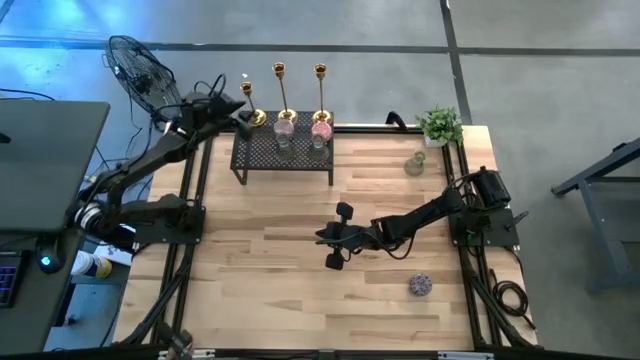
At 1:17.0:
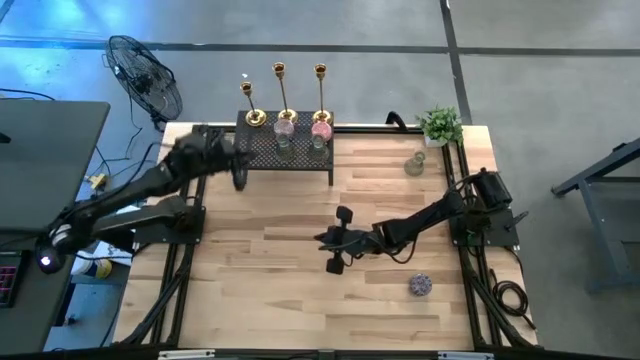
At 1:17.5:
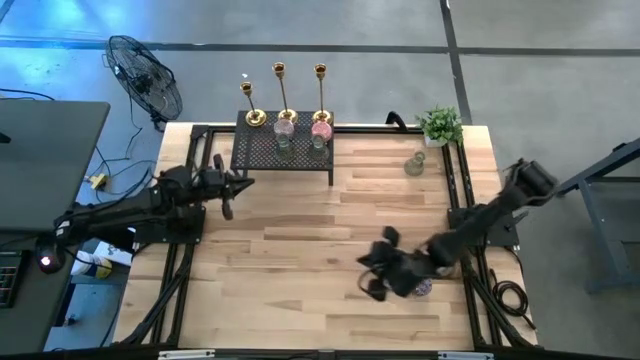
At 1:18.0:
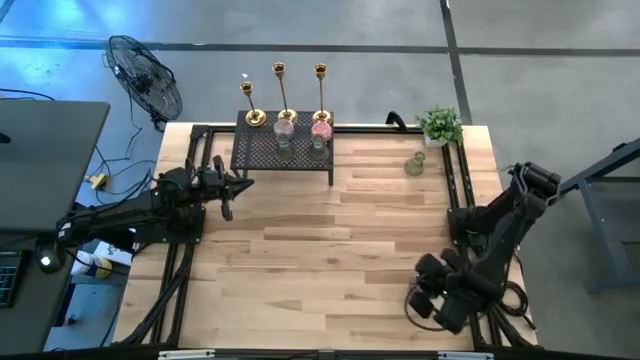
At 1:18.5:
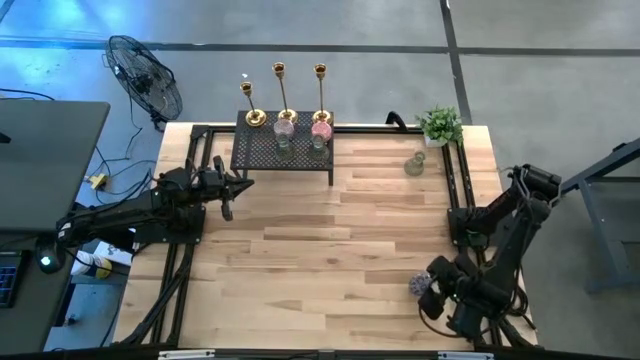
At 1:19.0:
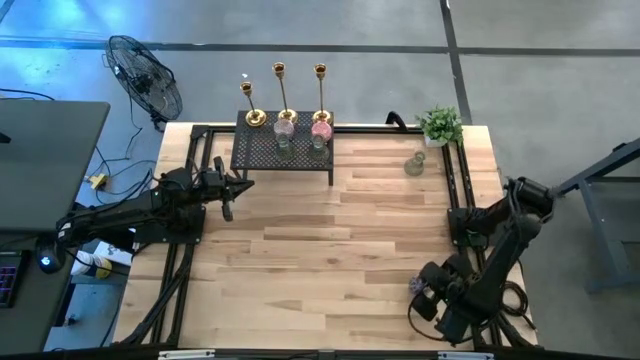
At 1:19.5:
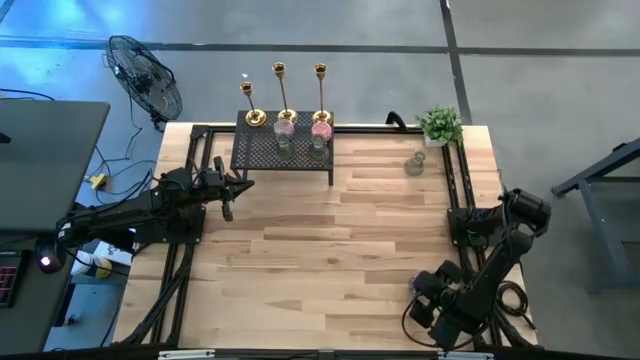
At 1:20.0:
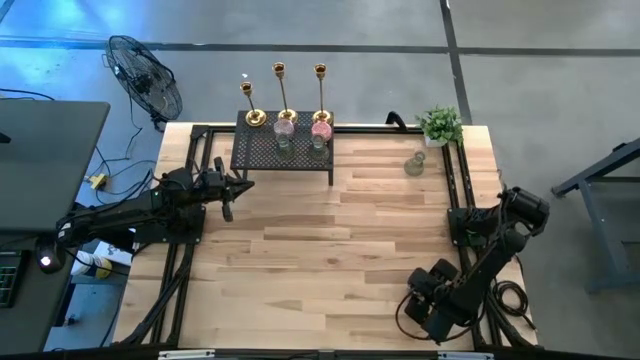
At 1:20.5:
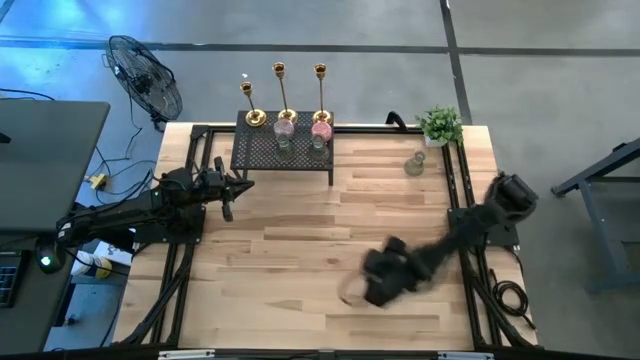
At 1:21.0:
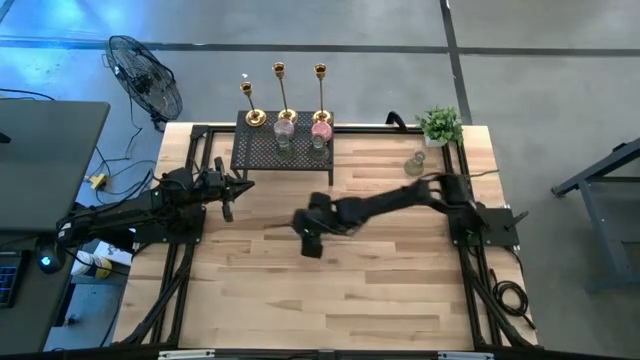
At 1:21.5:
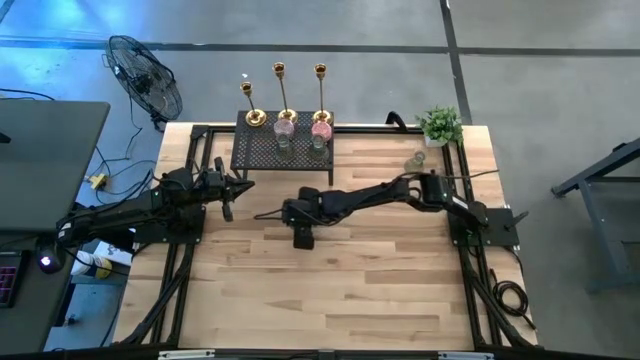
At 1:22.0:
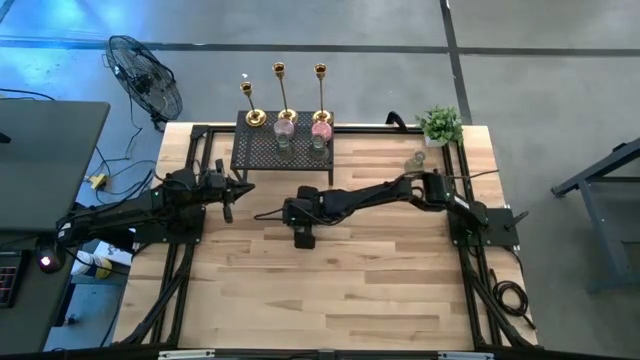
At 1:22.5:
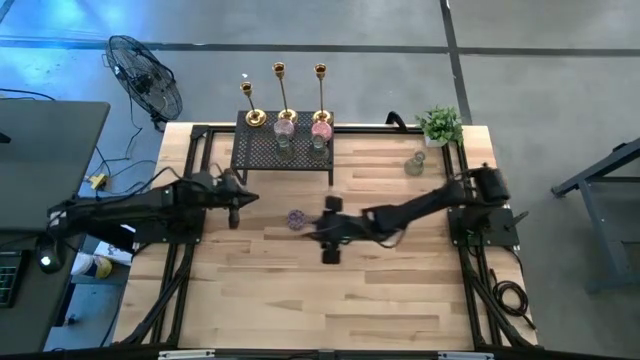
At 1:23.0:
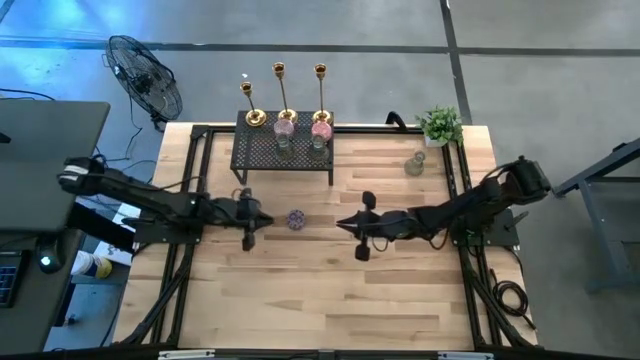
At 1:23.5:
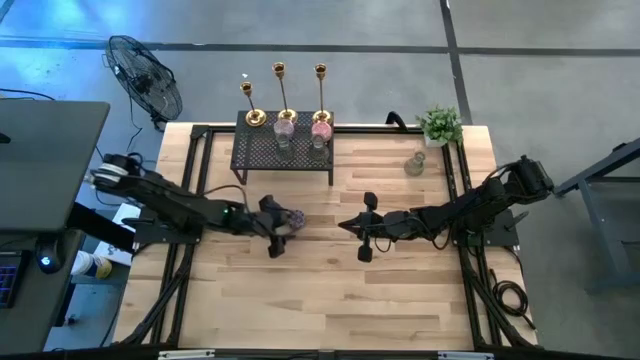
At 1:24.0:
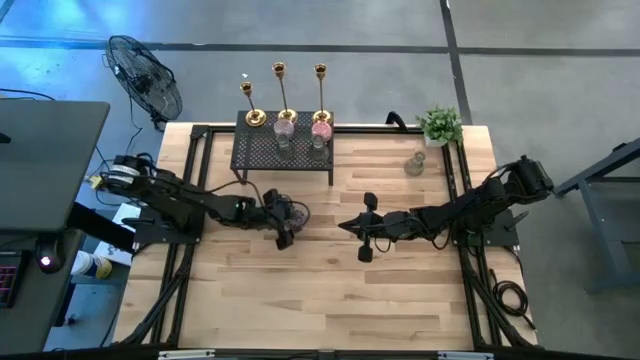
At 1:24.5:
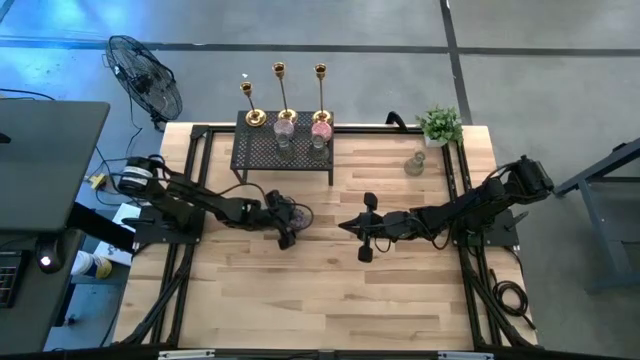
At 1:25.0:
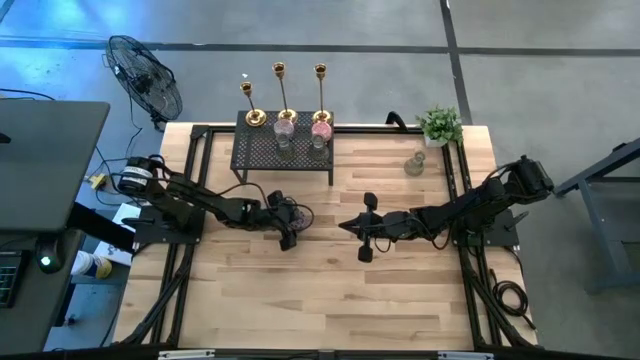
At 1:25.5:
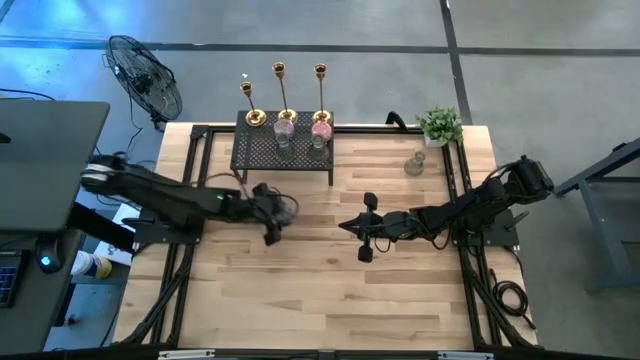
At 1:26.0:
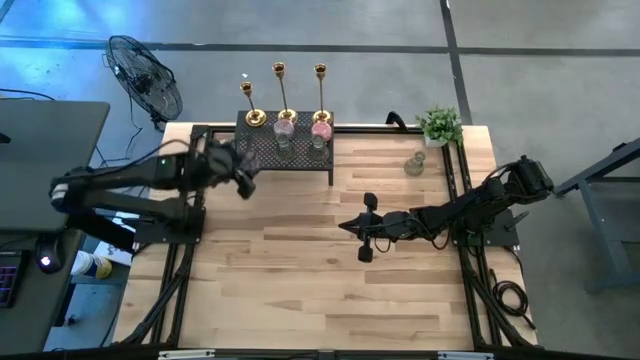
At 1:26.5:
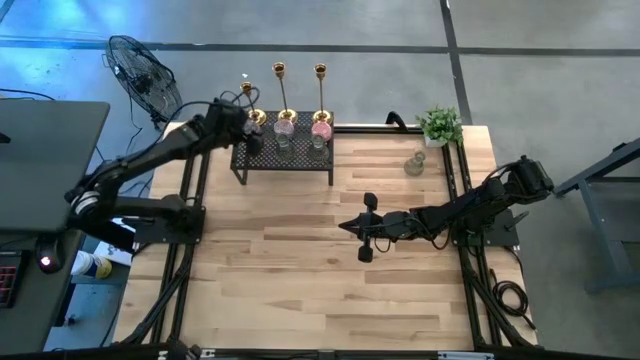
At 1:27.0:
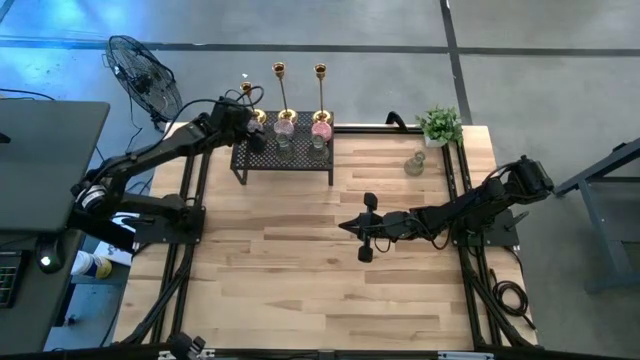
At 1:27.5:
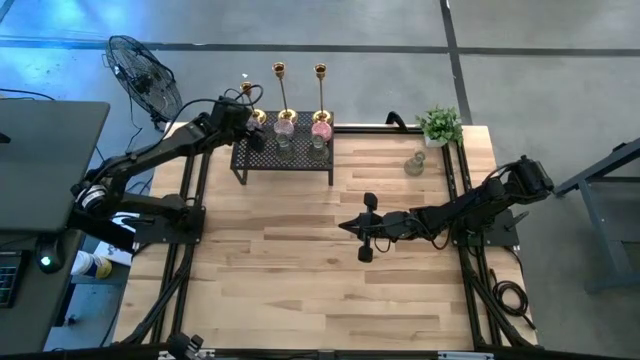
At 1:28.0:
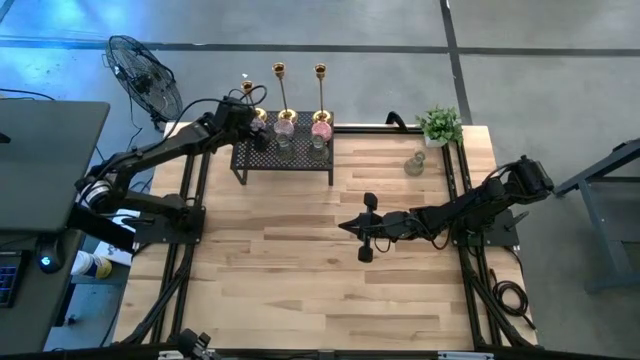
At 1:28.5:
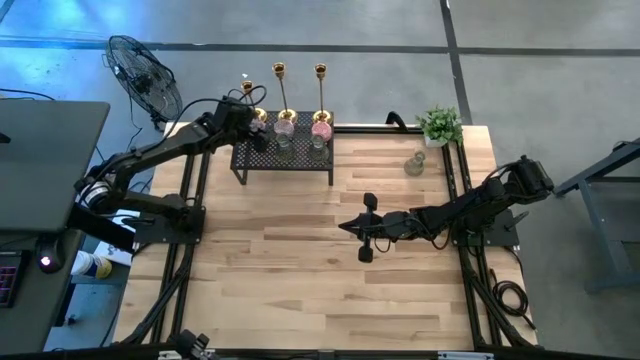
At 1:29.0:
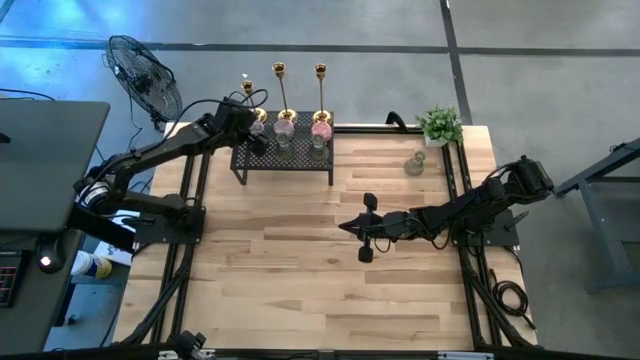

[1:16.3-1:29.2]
Task: Pick & Place candle stick holders
Put the red patterned scented candle on the shelf

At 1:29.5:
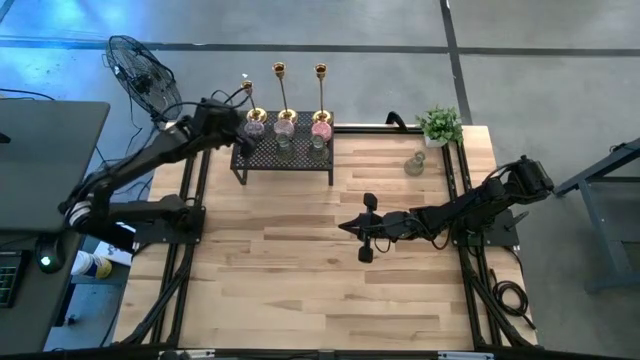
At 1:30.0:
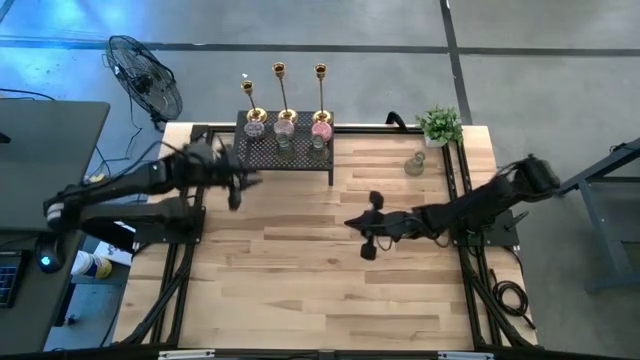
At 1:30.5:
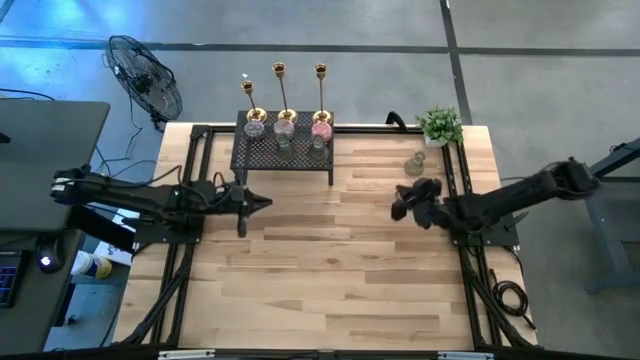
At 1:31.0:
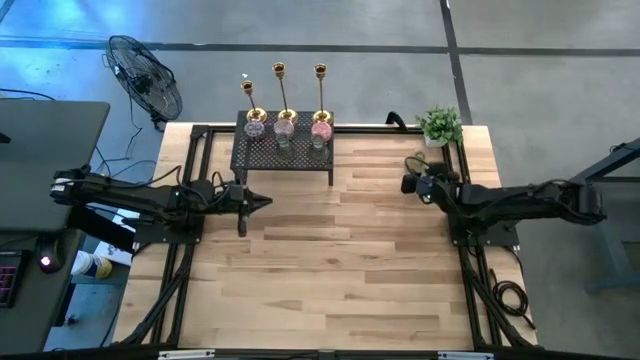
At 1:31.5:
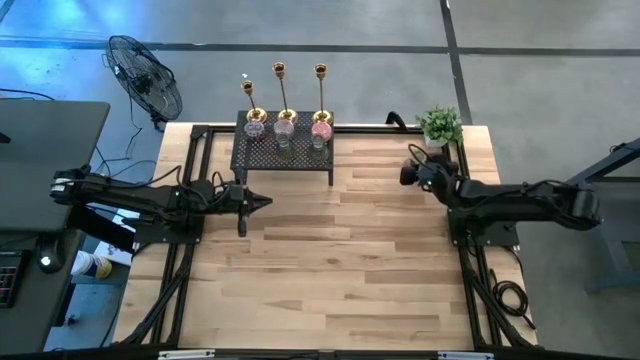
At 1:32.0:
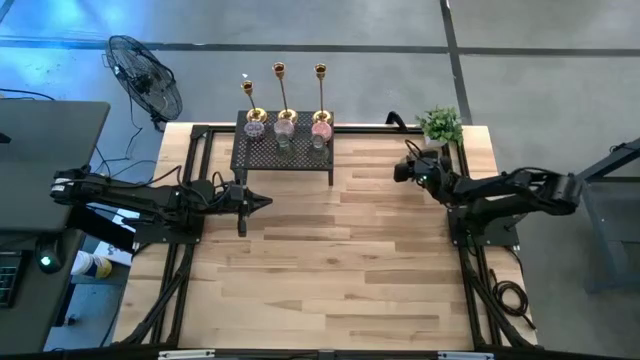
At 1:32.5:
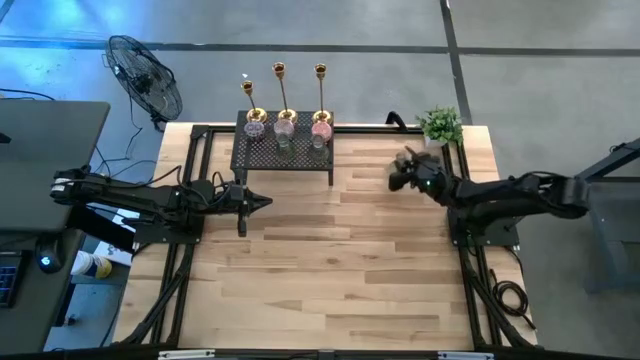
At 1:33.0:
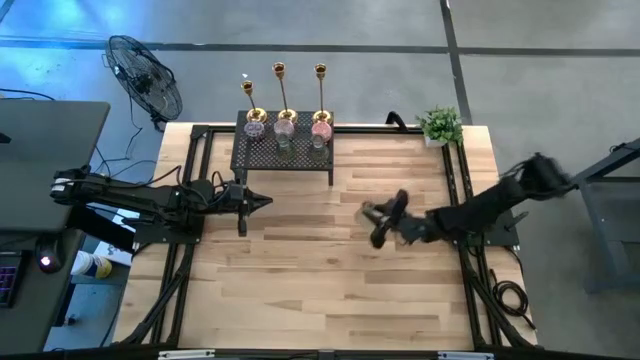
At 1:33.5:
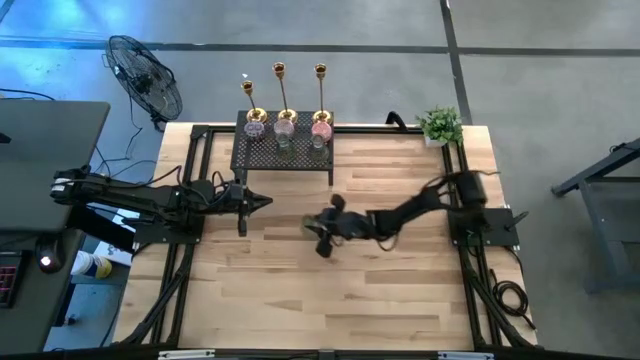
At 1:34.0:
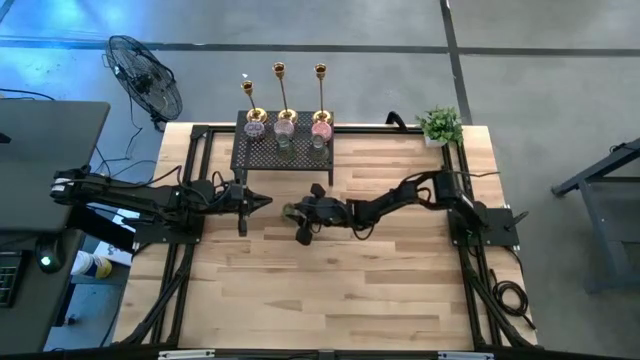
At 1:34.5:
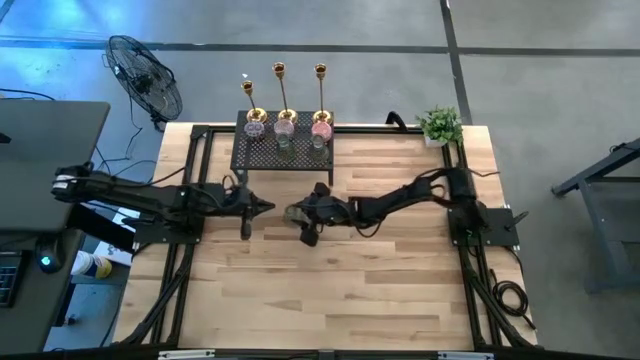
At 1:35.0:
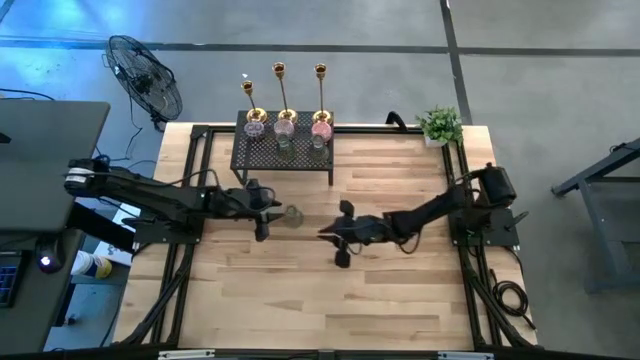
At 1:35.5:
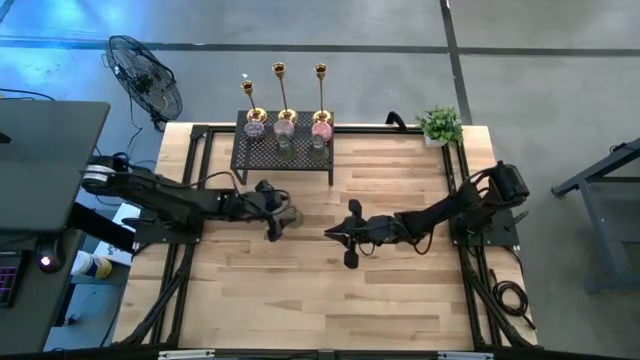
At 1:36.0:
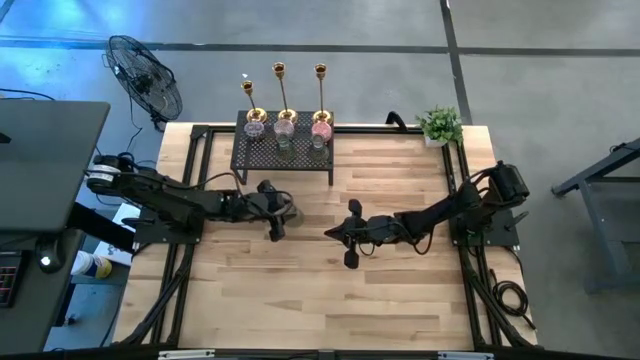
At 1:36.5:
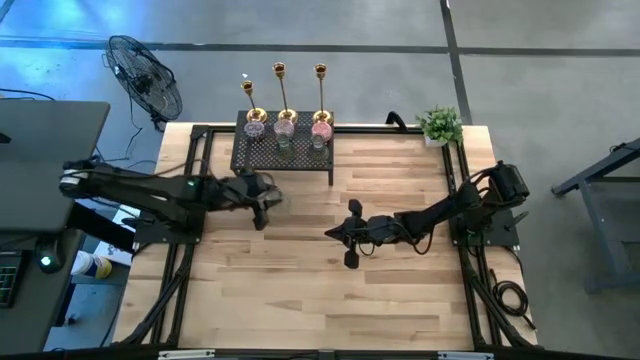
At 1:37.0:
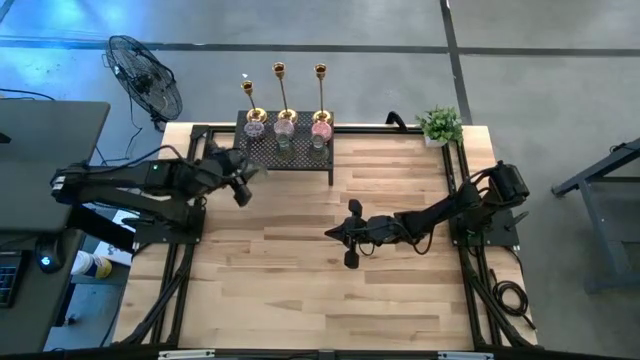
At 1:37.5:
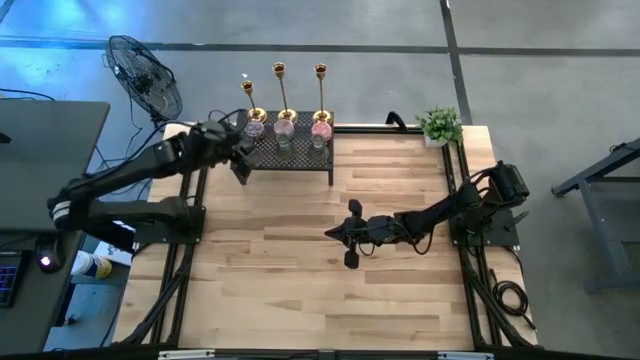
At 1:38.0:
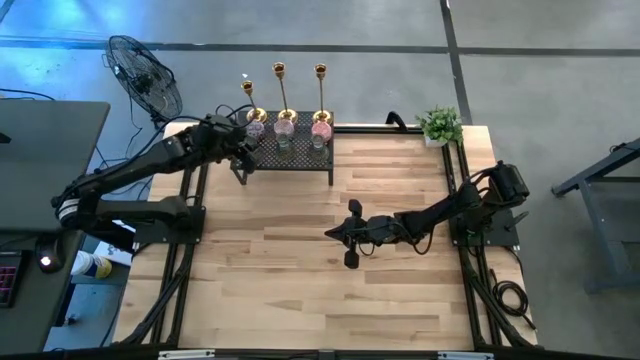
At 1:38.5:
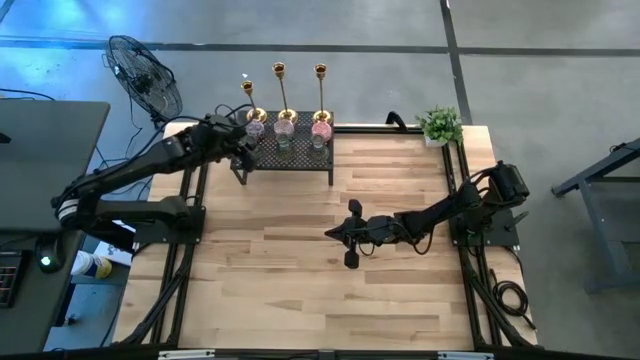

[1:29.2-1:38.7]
Put the green glass candle holder on the shelf
